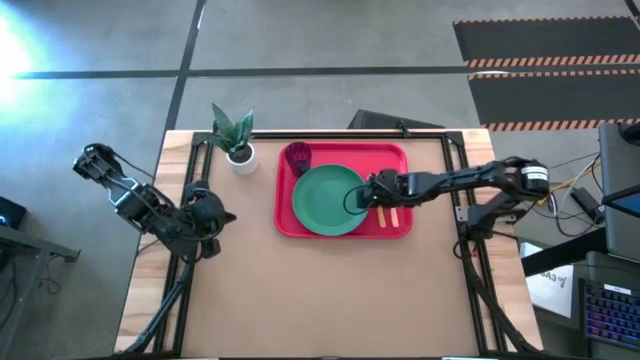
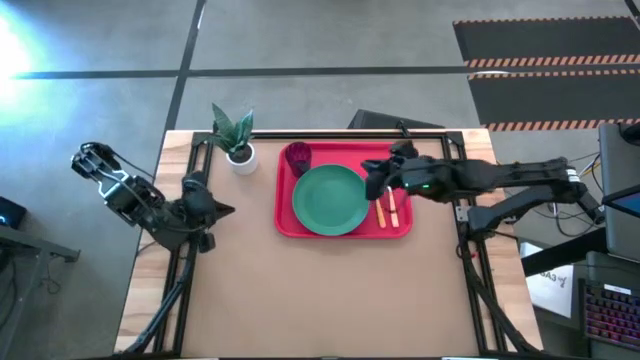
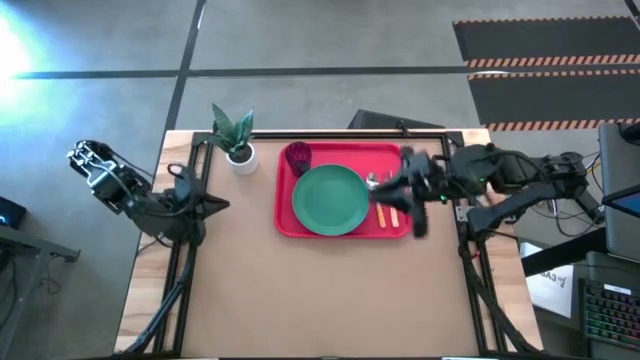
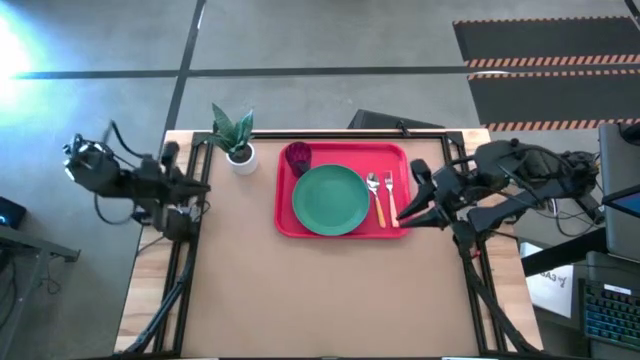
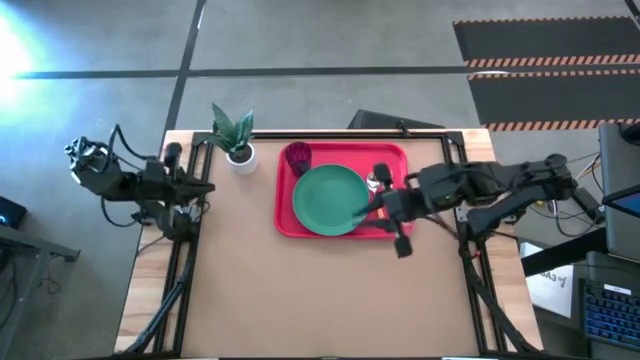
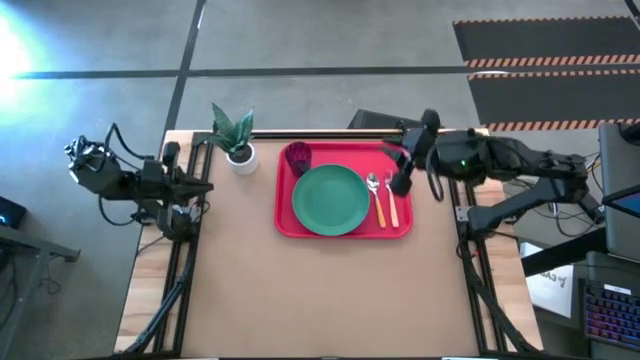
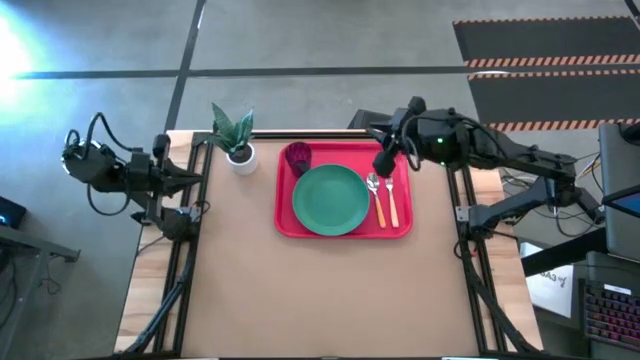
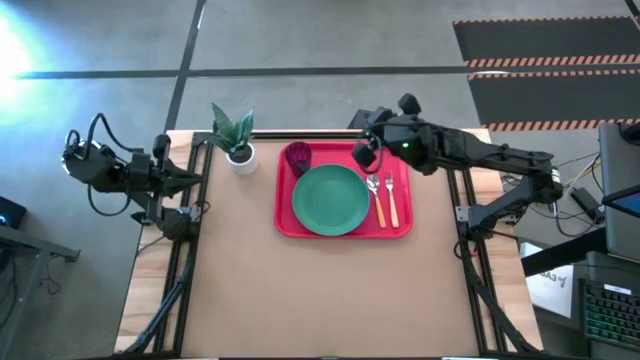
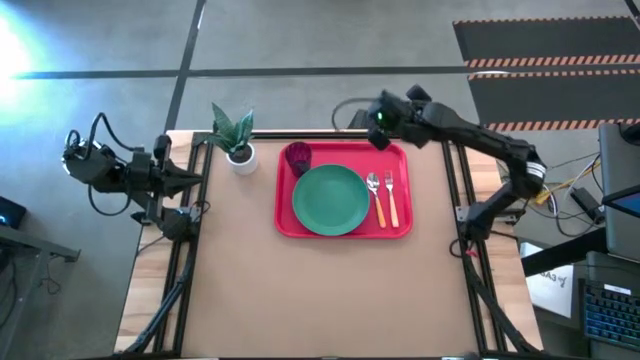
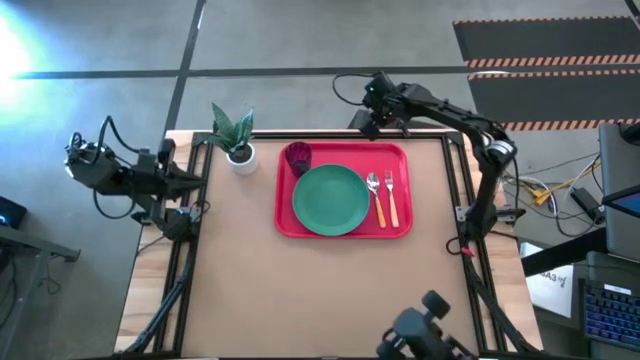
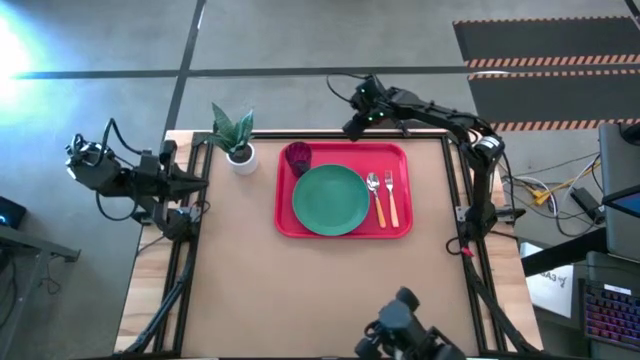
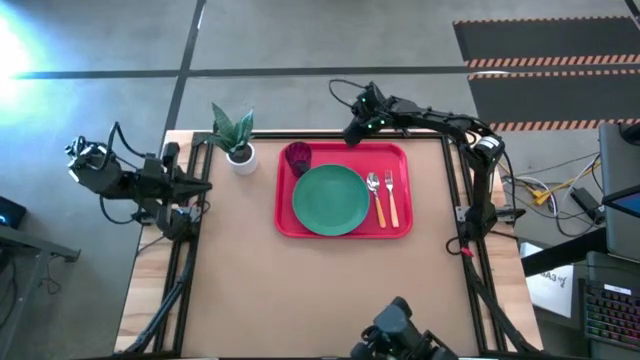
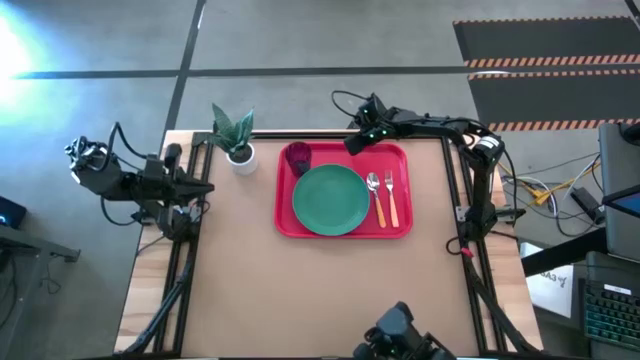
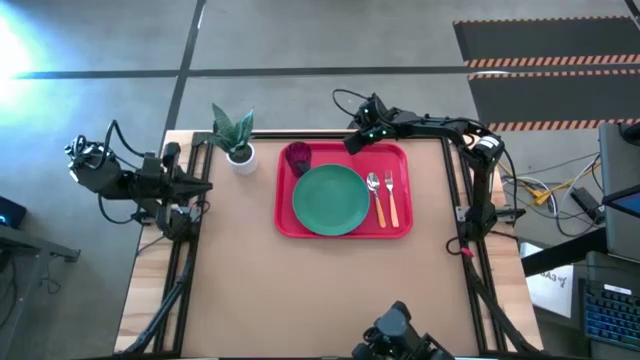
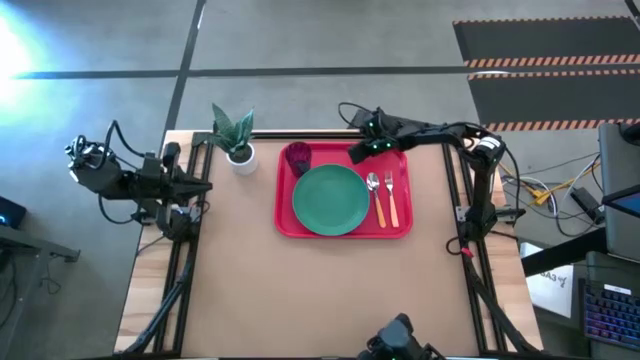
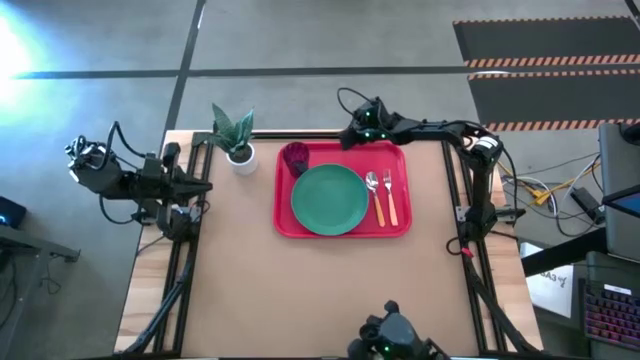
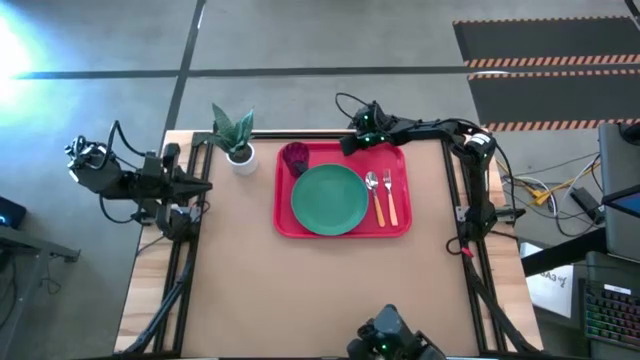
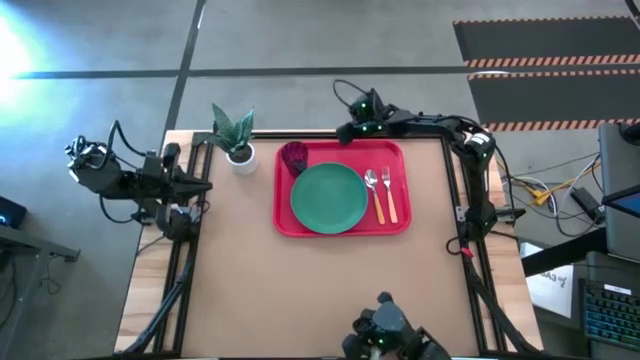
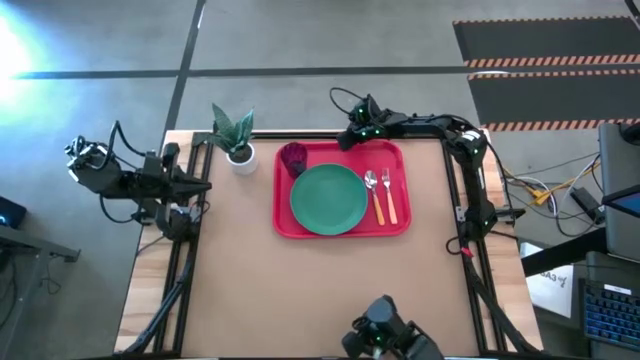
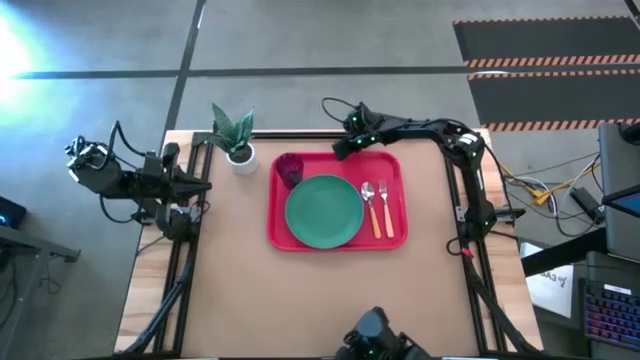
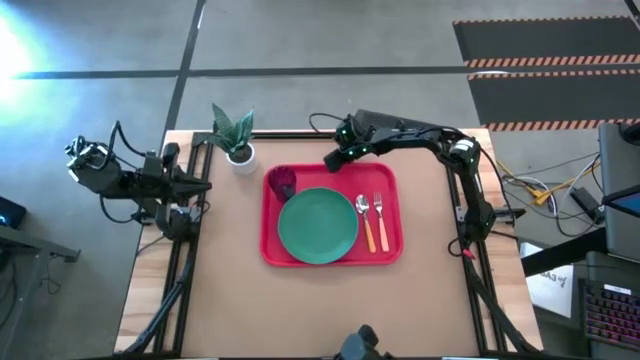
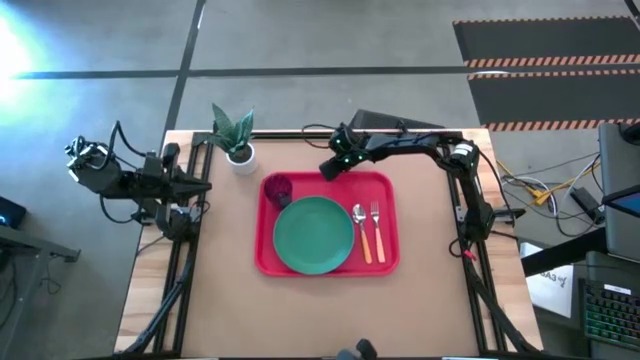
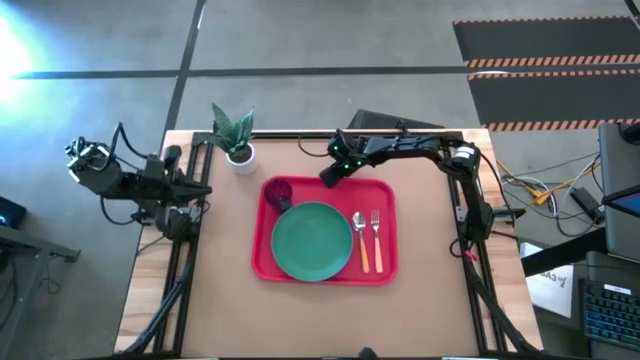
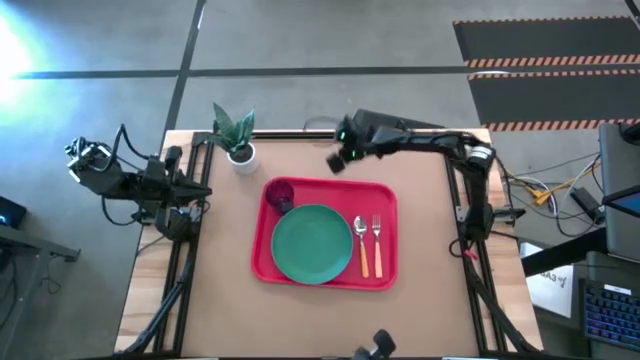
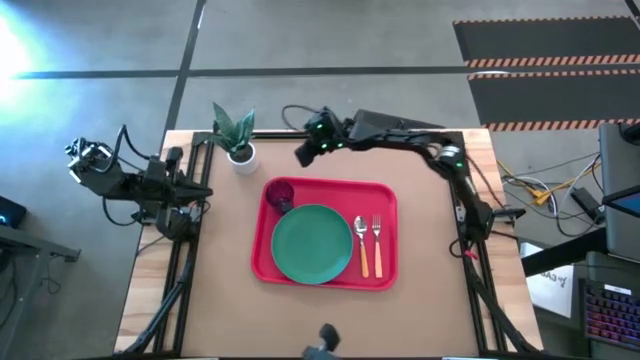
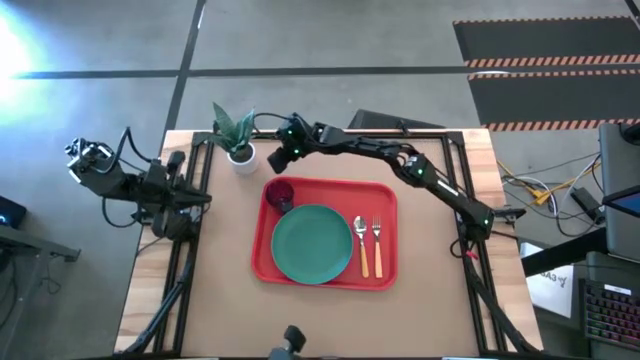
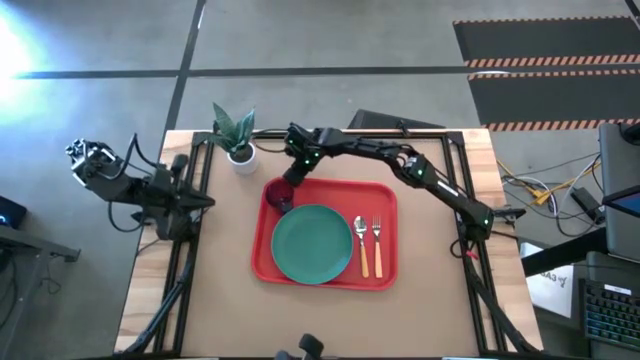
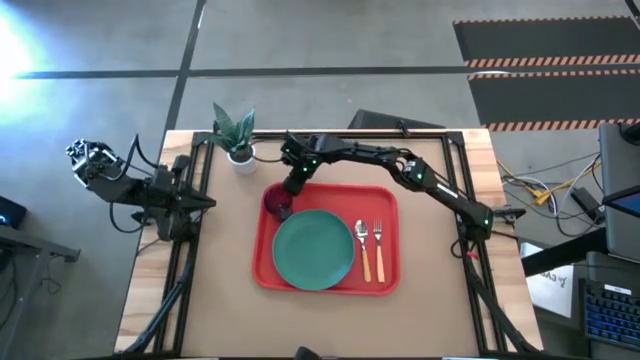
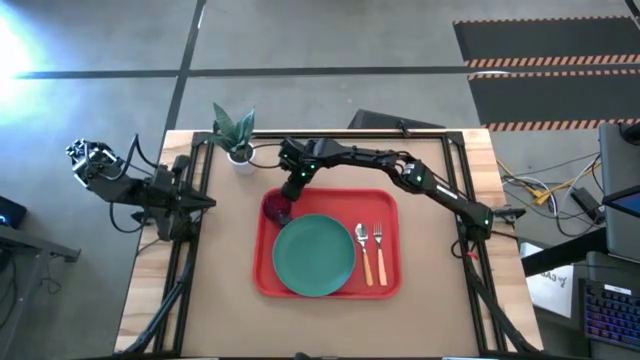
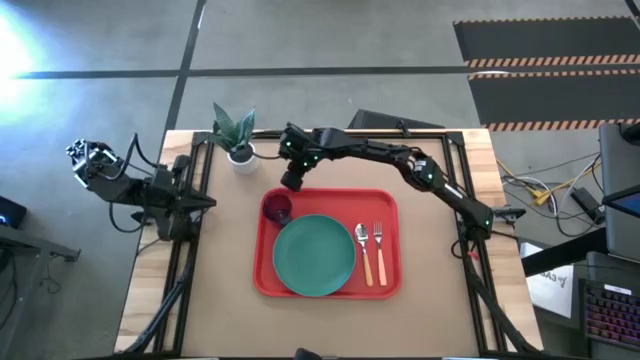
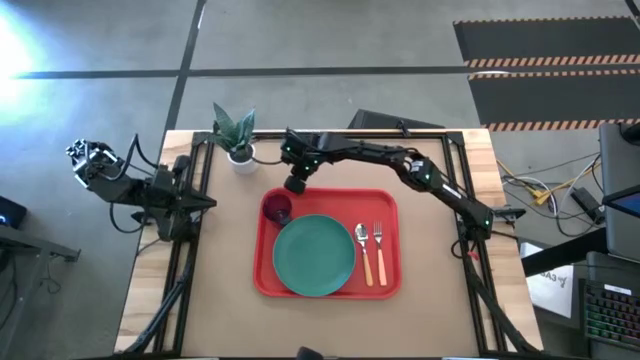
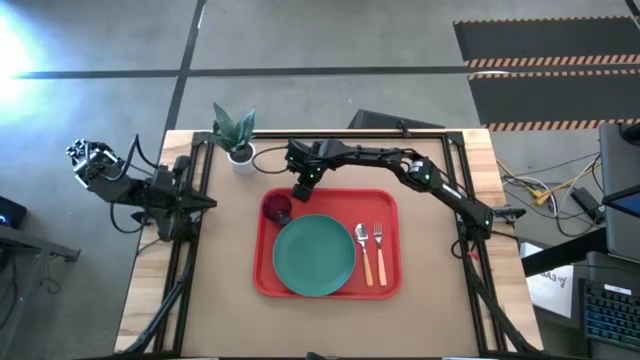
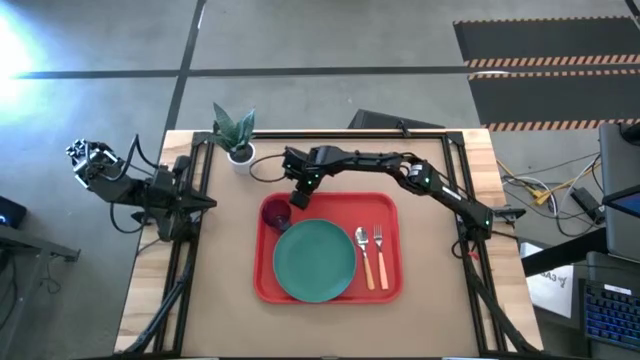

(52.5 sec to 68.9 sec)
Task: Pick and place plate/cup/fork/spoon on tray
Move the red tray to the center of the table

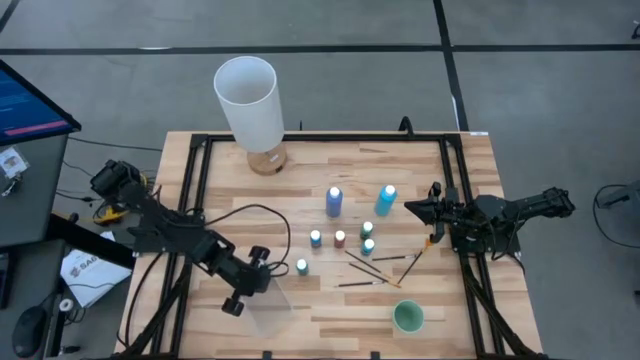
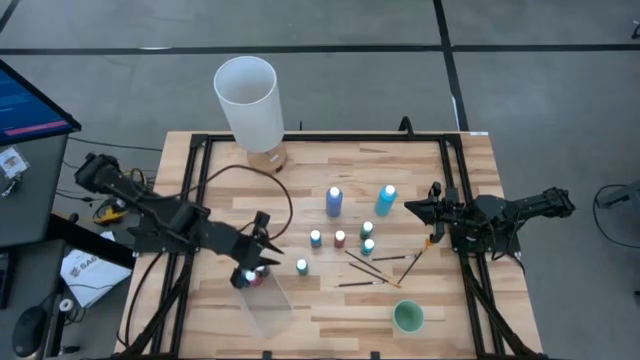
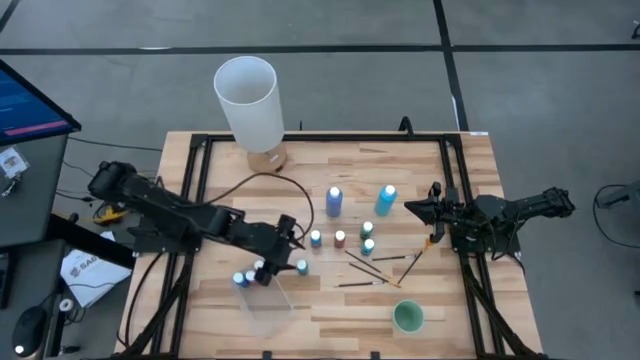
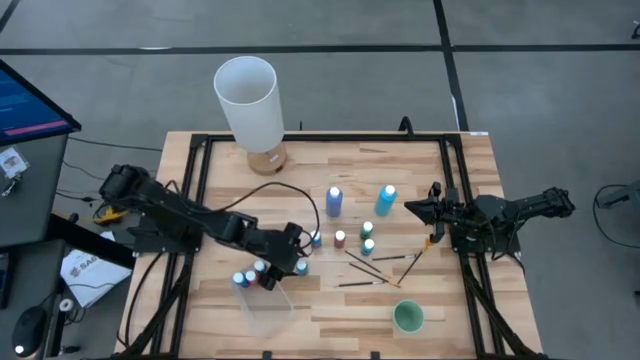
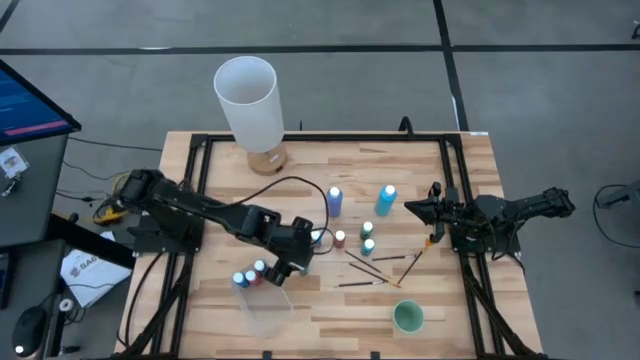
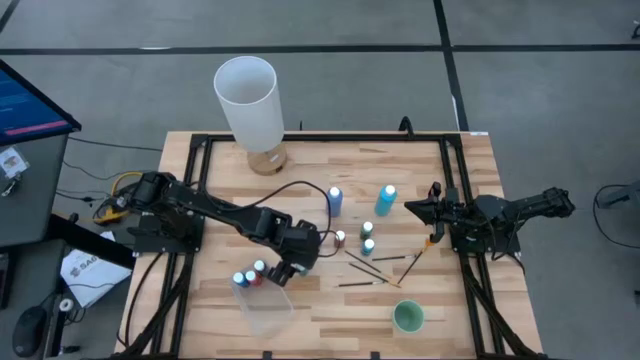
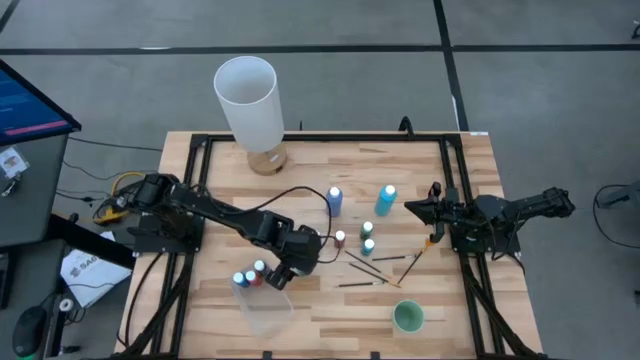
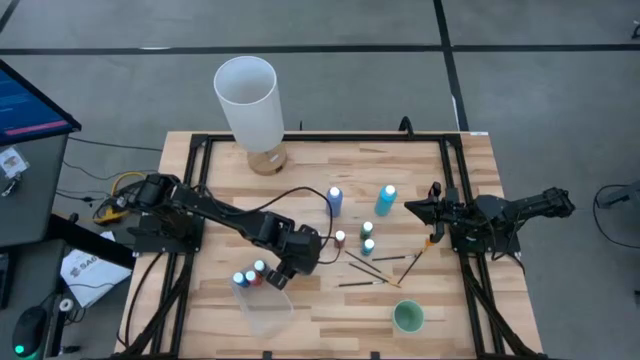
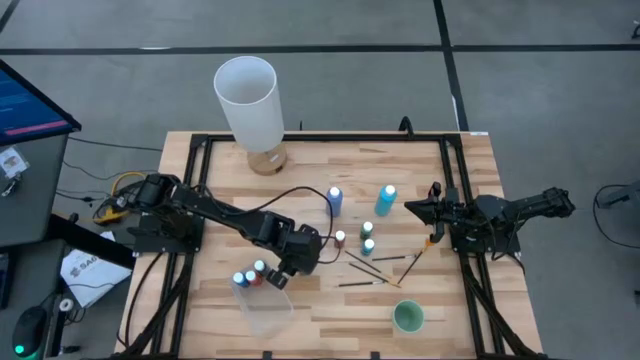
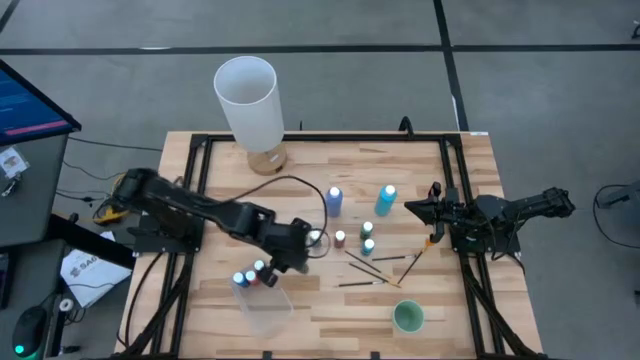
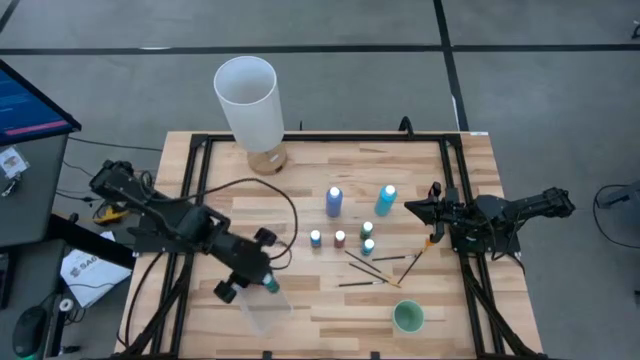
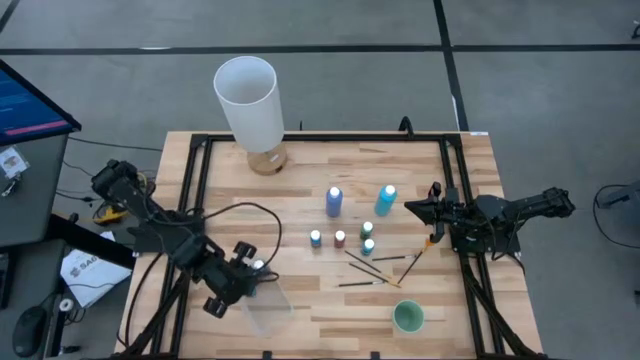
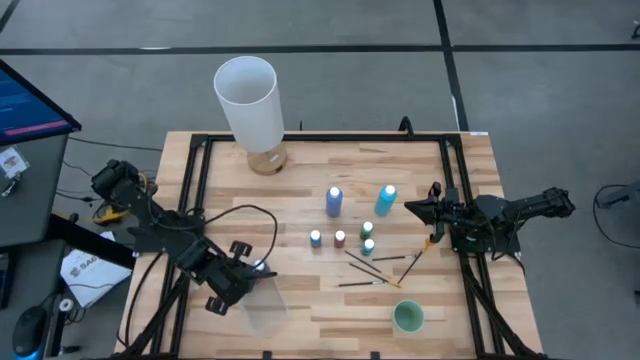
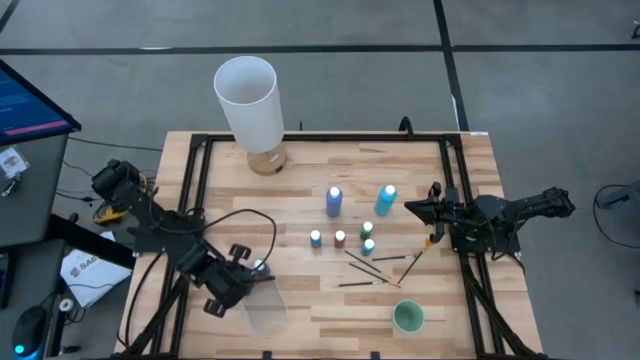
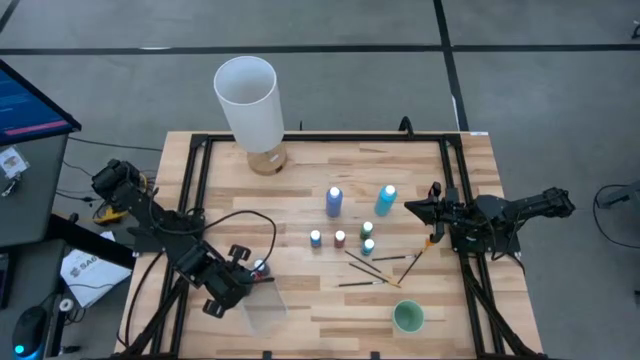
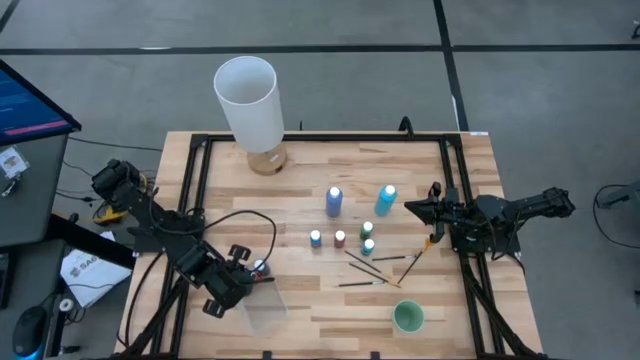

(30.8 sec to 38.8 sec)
Task: Pick & Place Paint Supplies
Put the green paint bottle into the transparent bin
